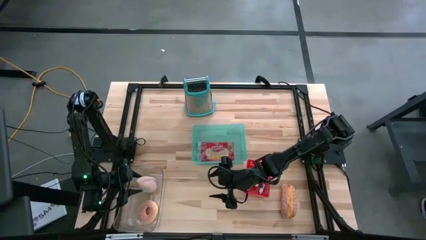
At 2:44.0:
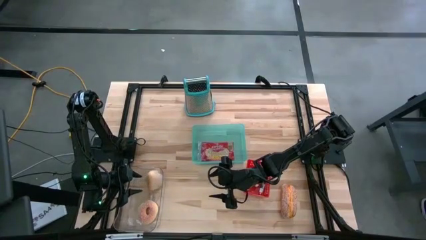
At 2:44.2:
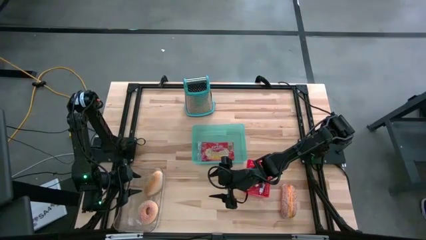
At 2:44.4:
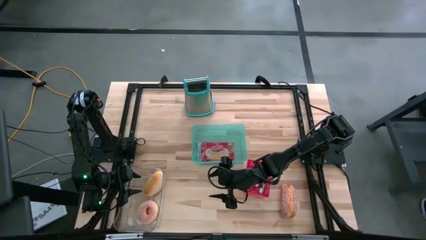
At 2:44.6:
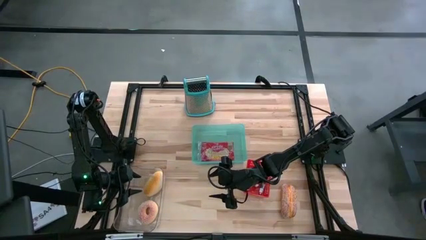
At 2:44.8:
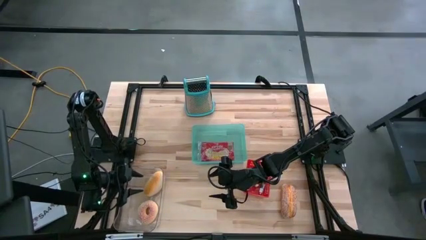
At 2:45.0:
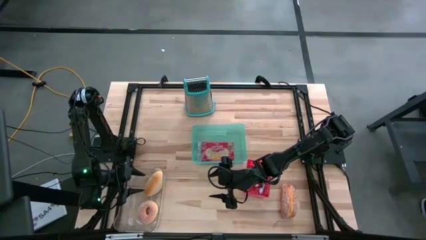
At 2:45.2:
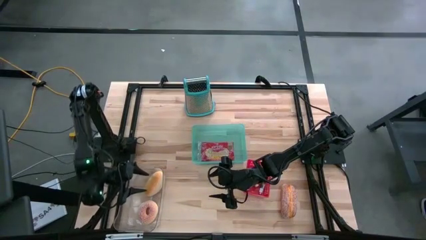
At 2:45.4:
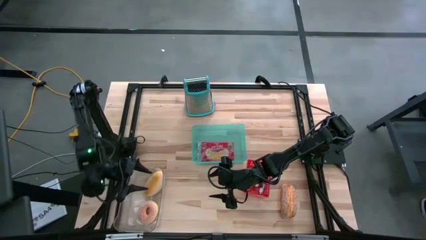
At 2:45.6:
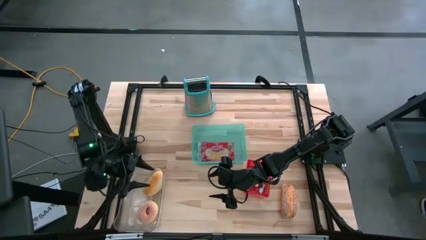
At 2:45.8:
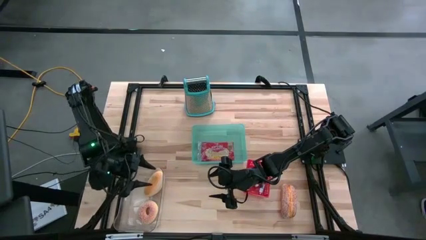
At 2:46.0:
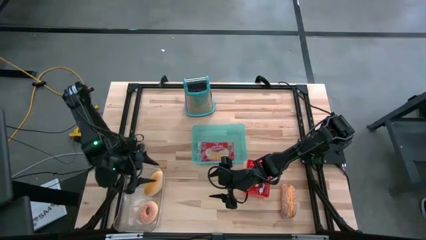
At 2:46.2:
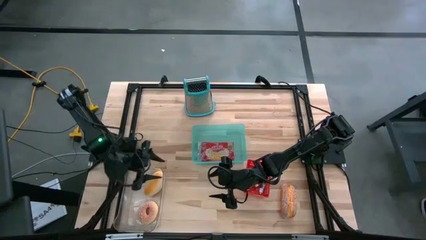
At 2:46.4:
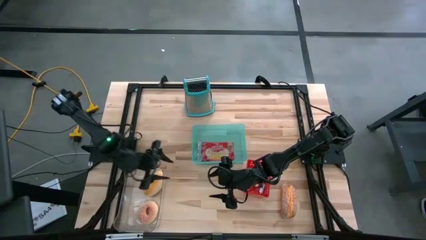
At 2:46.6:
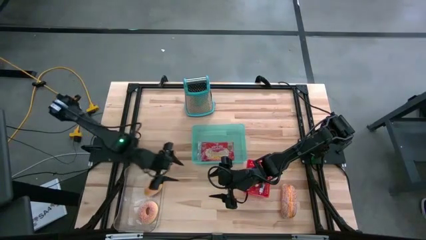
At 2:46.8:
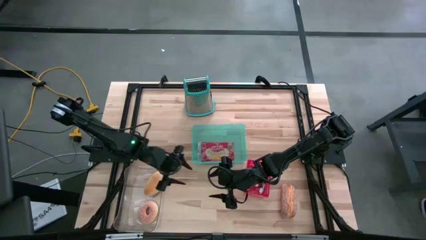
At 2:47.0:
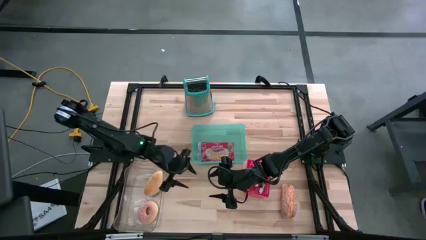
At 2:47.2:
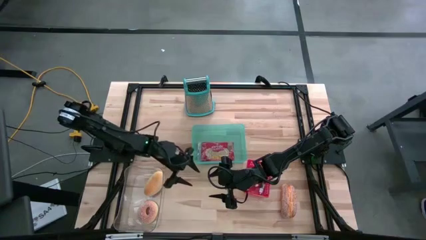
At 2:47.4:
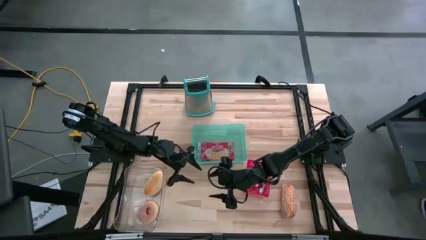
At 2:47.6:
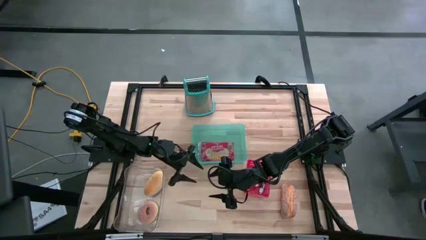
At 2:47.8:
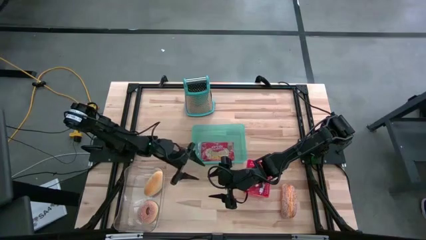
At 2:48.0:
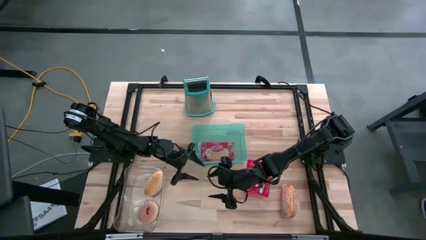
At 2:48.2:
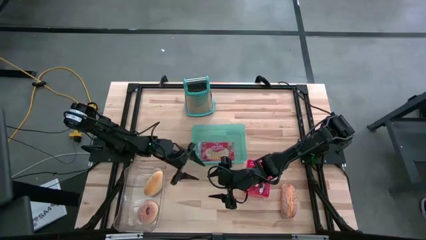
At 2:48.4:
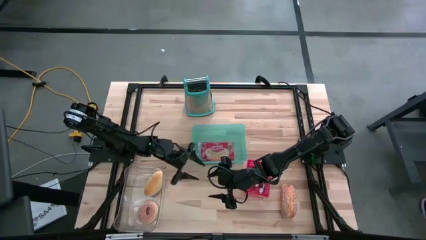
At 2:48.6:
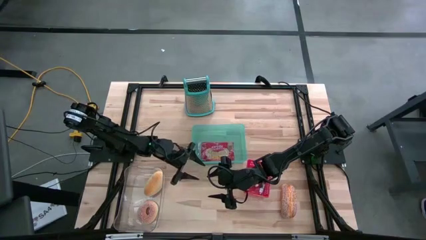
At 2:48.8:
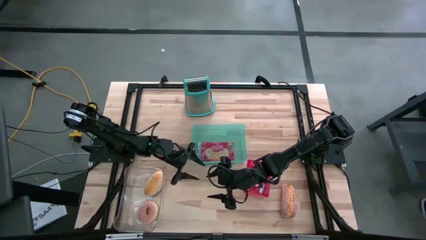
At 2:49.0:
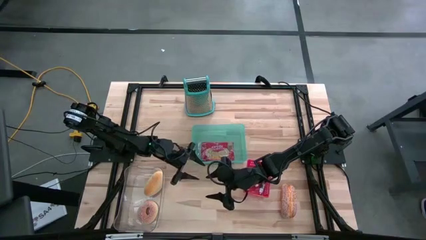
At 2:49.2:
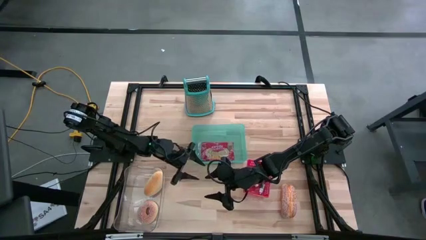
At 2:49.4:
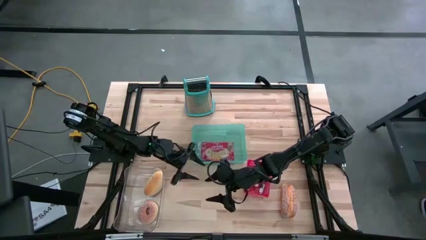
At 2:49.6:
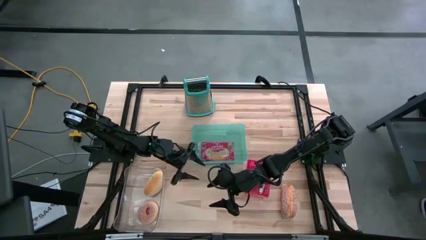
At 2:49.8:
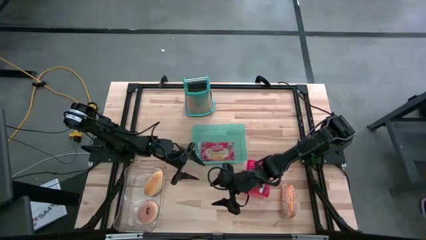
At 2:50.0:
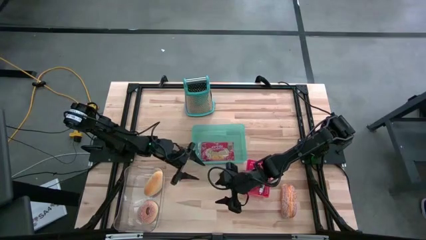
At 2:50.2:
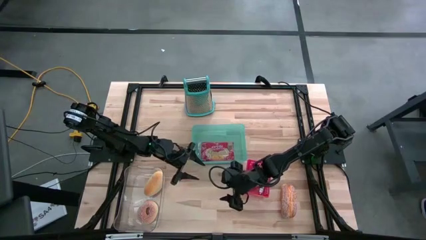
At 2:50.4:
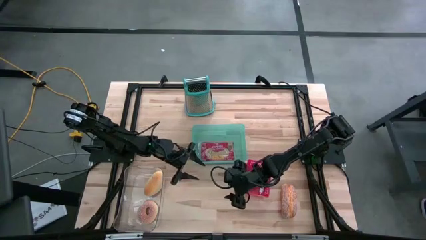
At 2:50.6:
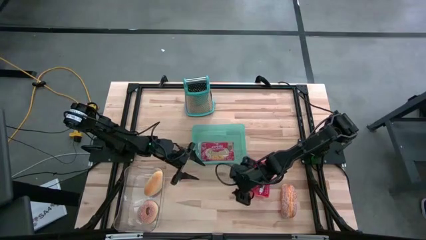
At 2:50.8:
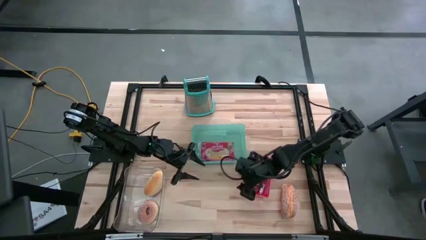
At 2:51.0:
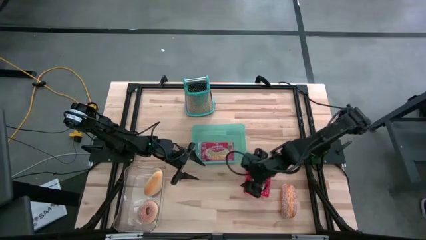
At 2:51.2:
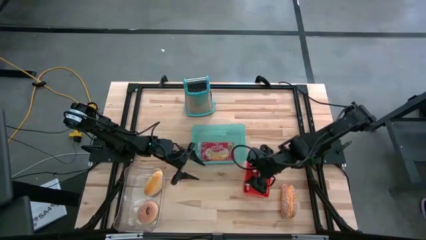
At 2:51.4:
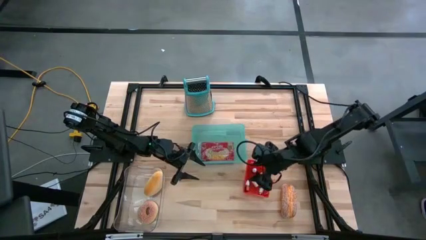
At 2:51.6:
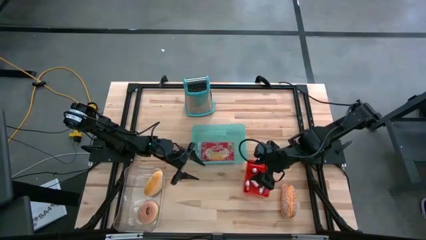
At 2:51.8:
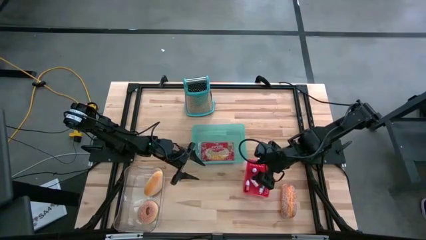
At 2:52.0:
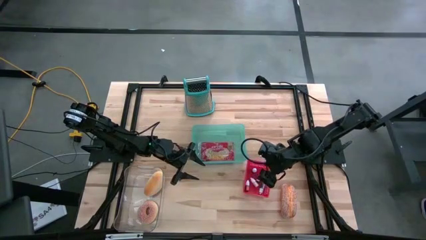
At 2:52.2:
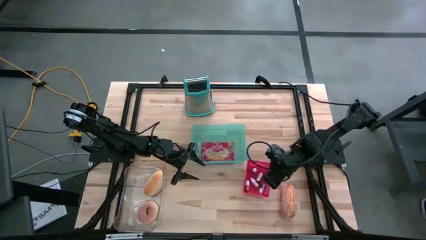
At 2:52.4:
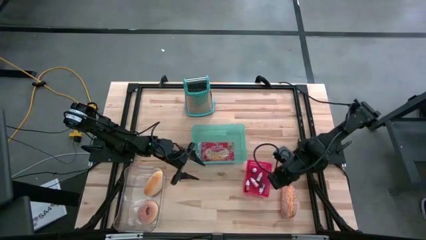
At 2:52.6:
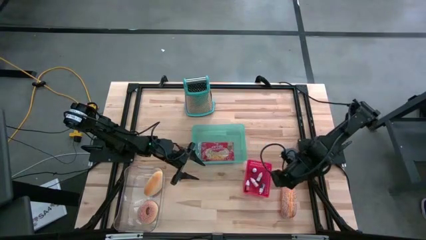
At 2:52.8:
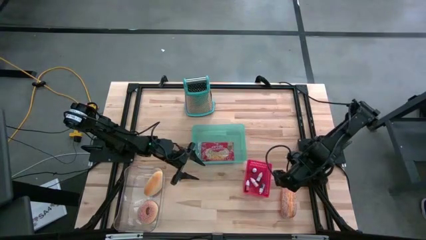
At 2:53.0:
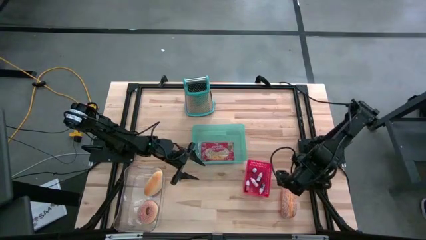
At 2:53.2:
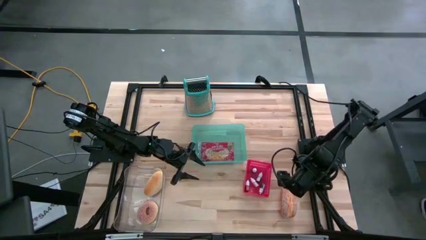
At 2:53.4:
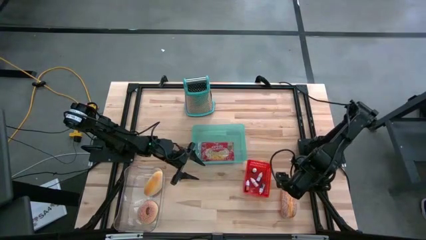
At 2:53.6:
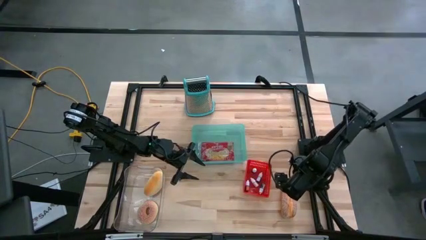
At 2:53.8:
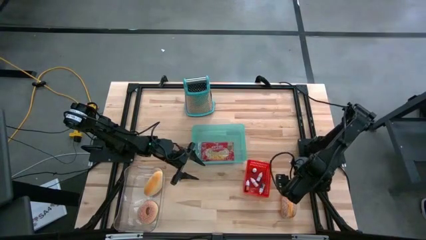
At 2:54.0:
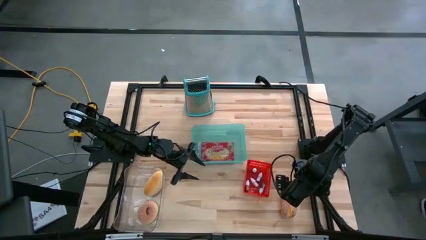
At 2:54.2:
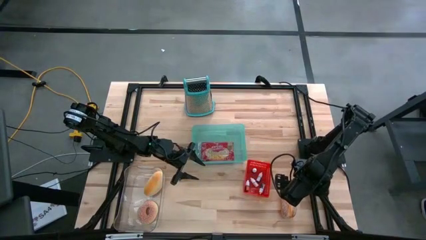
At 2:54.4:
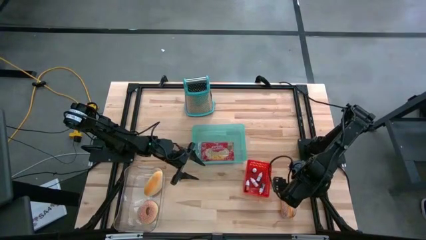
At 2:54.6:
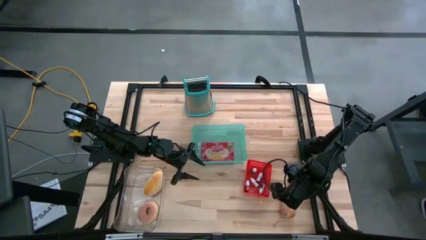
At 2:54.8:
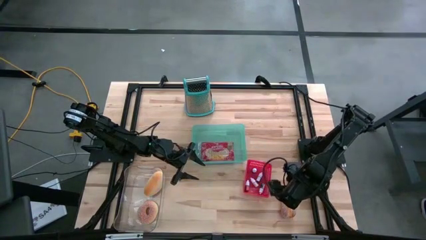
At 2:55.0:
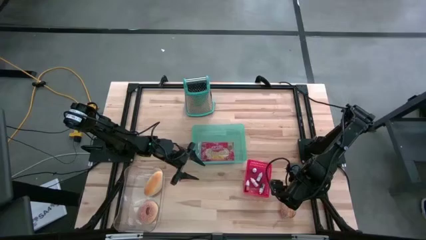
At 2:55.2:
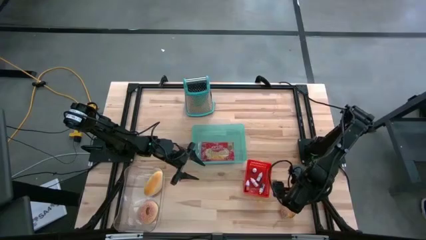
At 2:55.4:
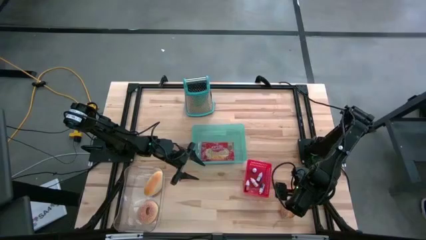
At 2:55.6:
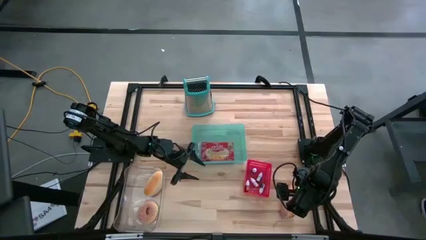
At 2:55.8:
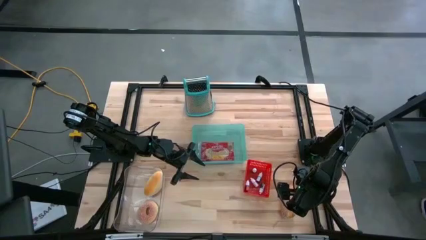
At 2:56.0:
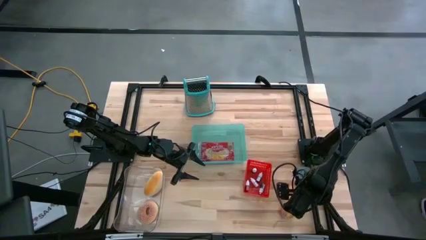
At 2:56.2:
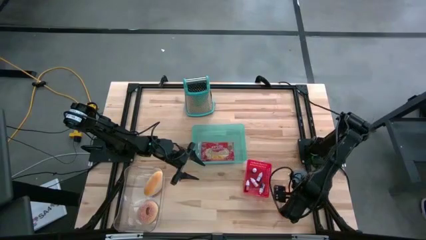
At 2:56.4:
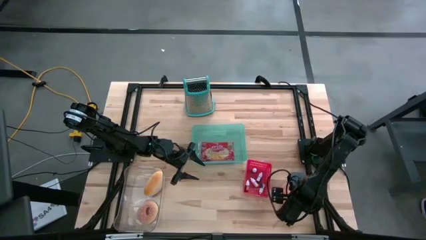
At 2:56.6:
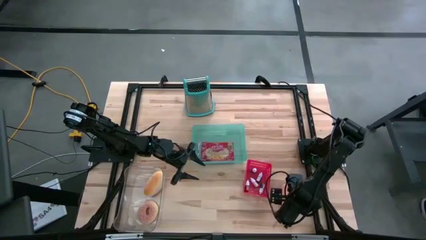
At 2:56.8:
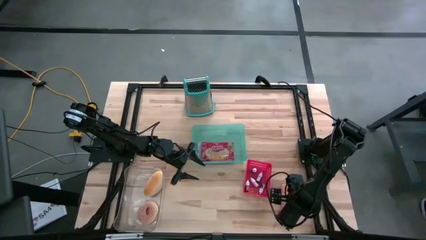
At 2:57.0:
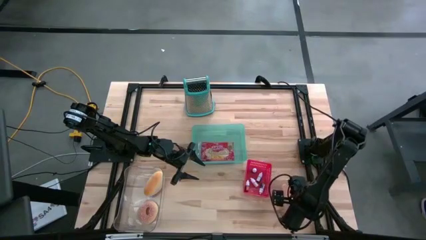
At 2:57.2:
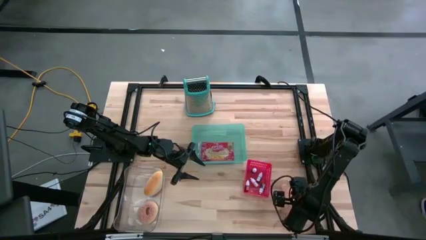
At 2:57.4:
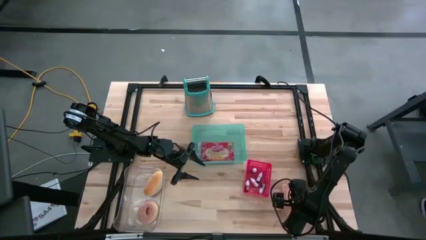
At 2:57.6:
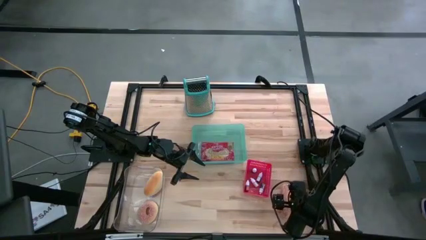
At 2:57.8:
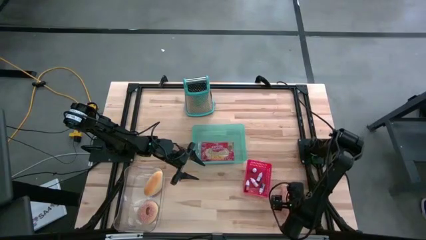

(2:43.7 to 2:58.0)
Task: Pick & Place Food Item
Put the bread into the transparent bin
